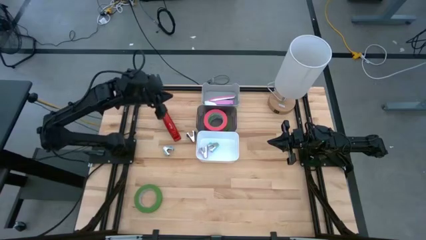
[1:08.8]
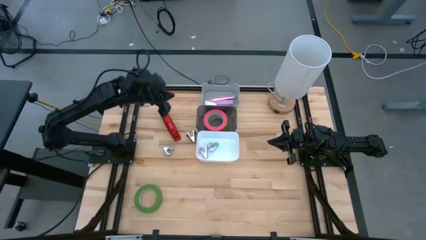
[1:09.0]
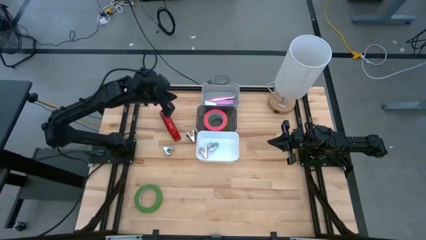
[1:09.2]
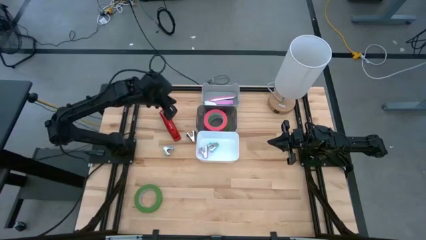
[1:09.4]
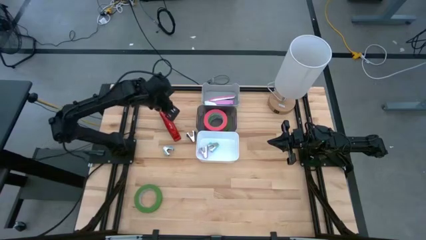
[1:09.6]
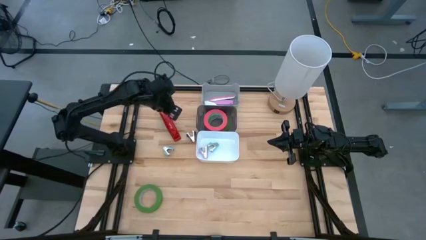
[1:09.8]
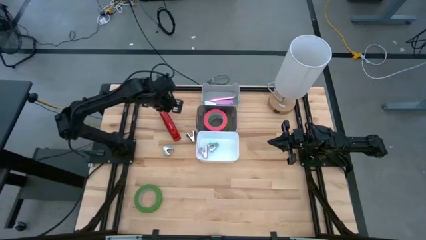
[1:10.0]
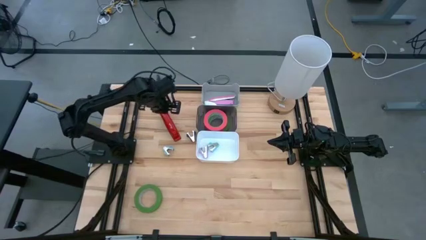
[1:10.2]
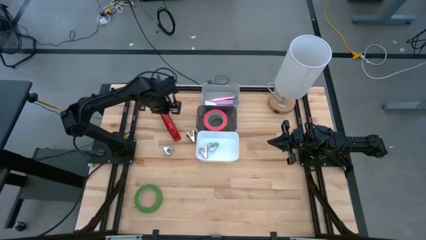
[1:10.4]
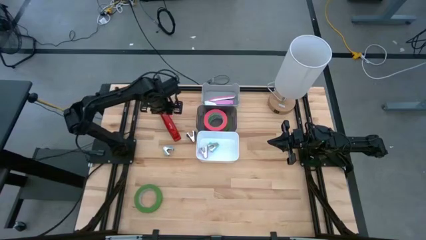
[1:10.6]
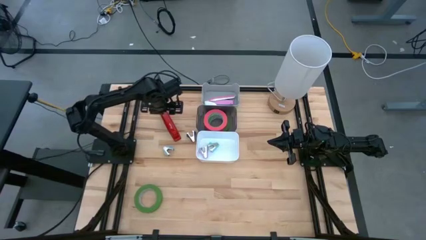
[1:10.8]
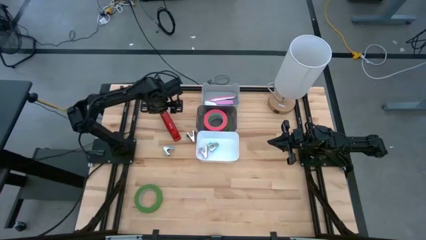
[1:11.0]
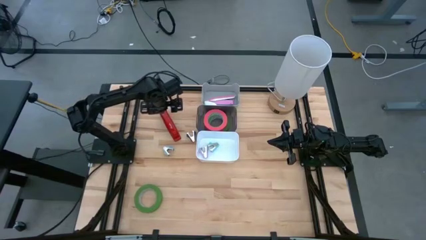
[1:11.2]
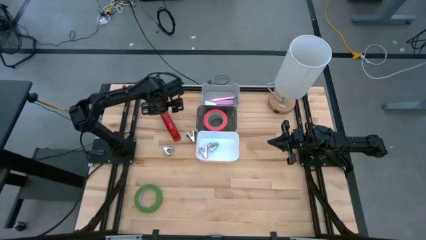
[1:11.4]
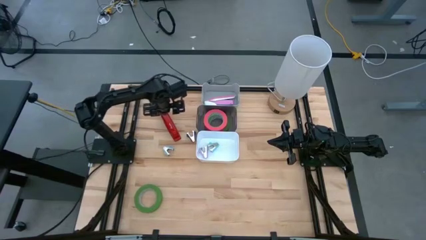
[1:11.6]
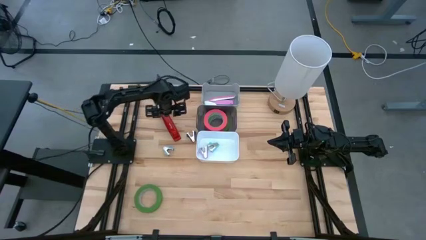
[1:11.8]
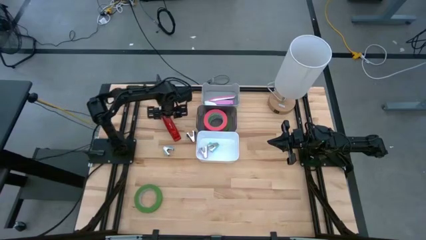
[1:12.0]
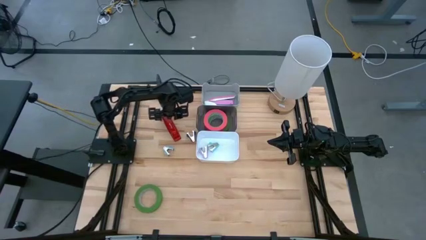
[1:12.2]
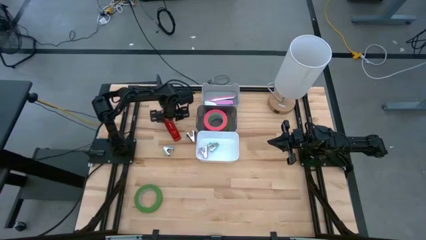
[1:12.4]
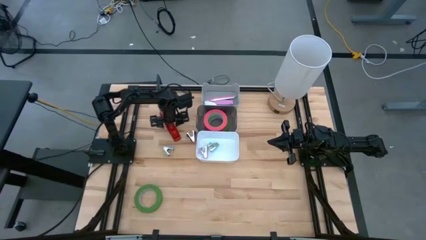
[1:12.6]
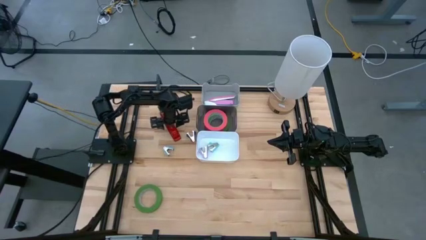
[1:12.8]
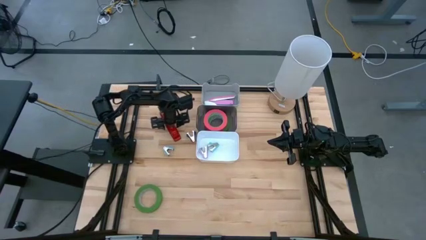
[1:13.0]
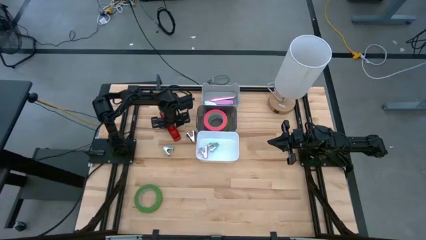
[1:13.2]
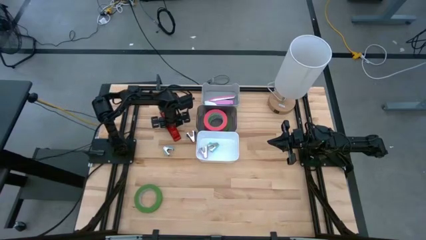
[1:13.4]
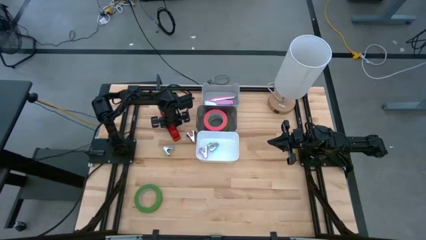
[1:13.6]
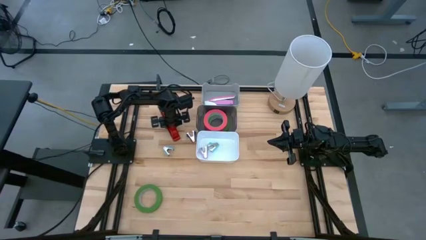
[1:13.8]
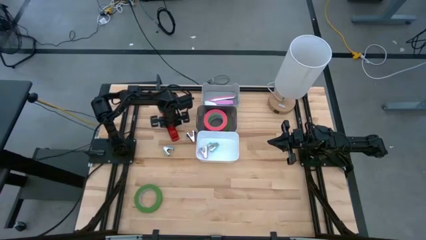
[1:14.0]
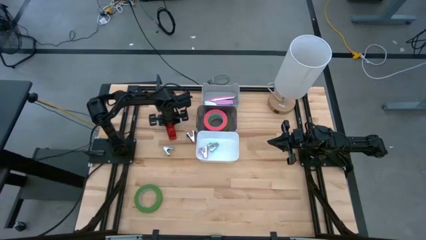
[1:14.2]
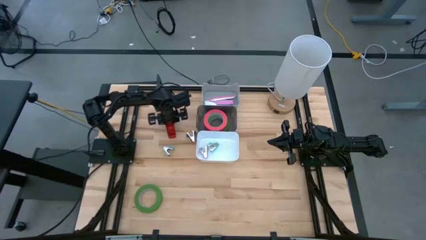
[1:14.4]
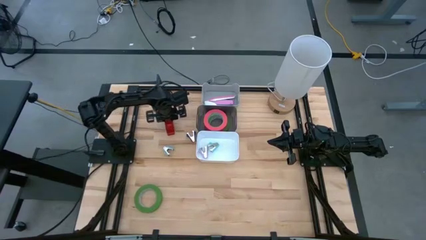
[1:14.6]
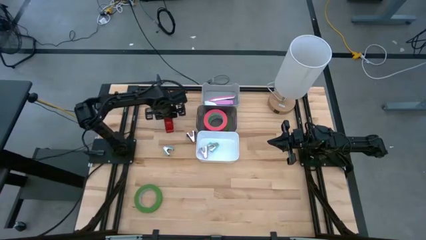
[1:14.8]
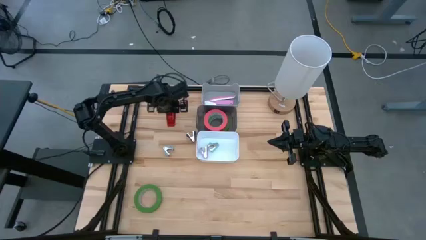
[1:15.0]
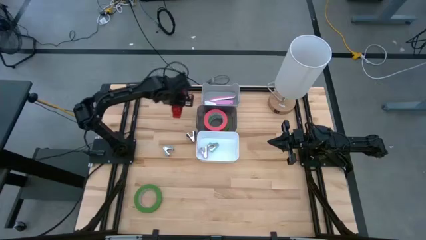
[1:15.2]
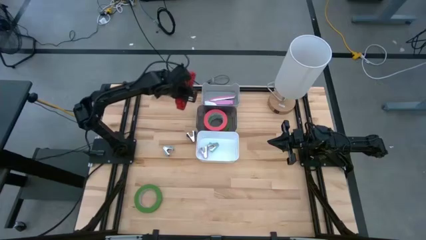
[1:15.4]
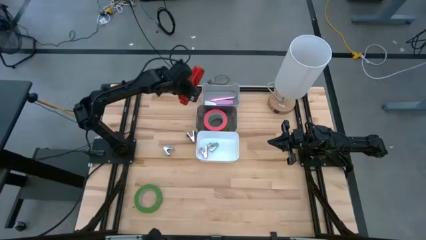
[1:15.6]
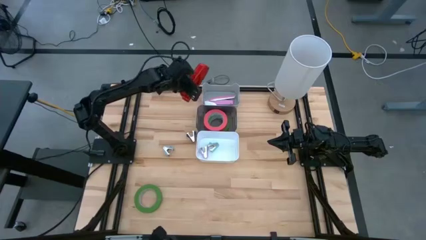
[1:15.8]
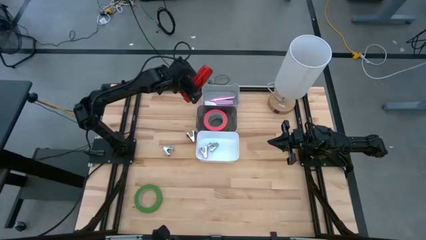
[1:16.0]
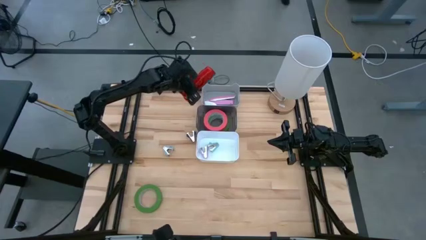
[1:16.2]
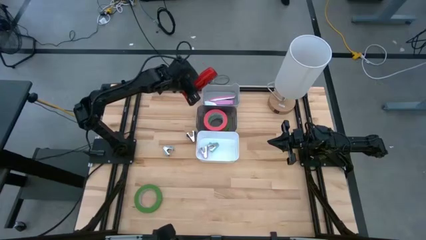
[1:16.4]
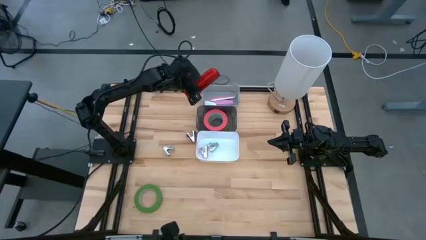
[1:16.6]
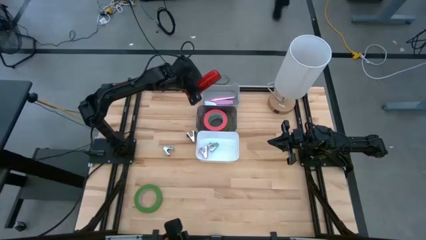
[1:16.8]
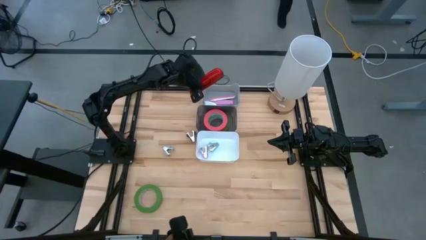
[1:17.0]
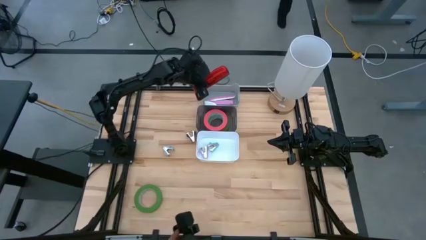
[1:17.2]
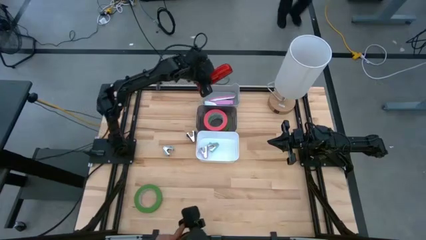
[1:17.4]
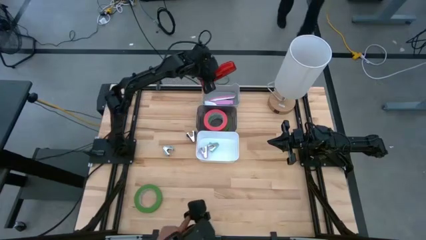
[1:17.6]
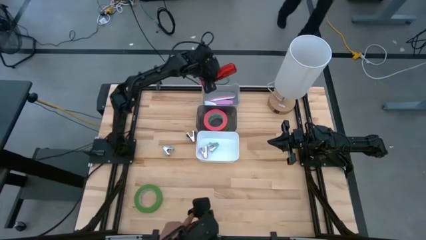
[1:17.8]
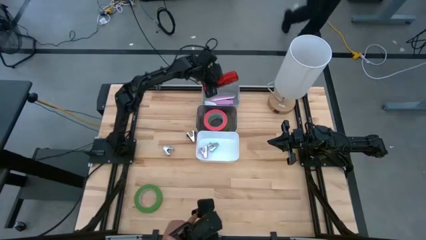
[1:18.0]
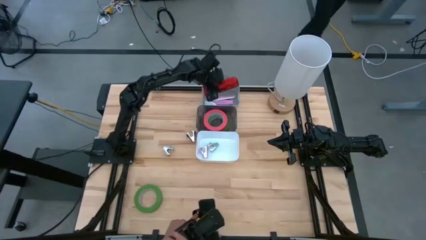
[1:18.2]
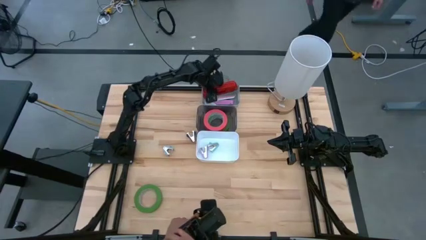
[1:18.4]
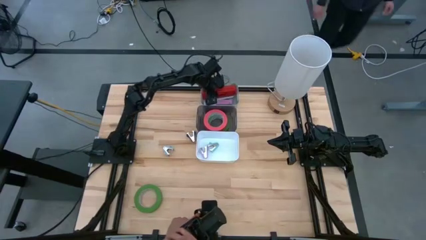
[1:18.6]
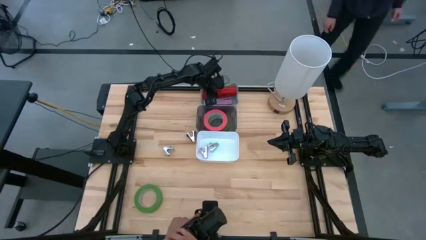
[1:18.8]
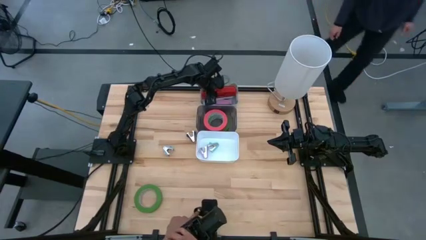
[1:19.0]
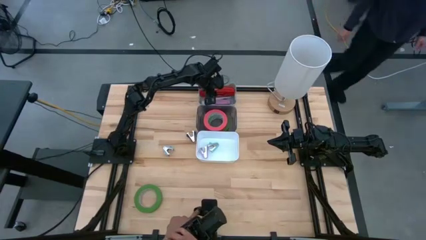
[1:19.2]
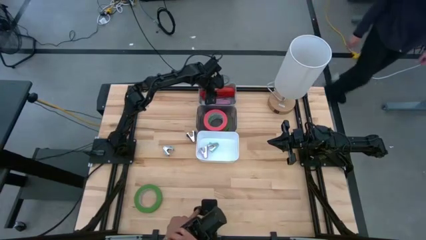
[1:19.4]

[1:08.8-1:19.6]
Task: Pick and place Stapler, Stapler remover, tape
Put the red stapler in the gray bin
